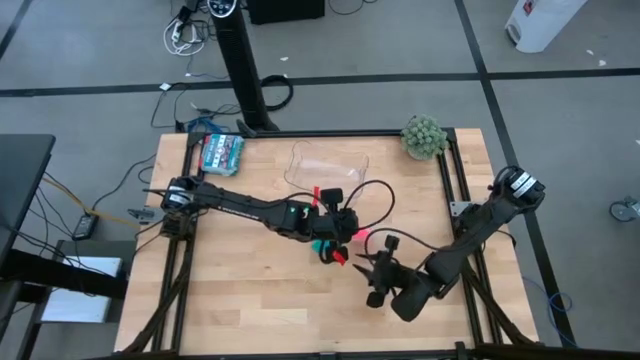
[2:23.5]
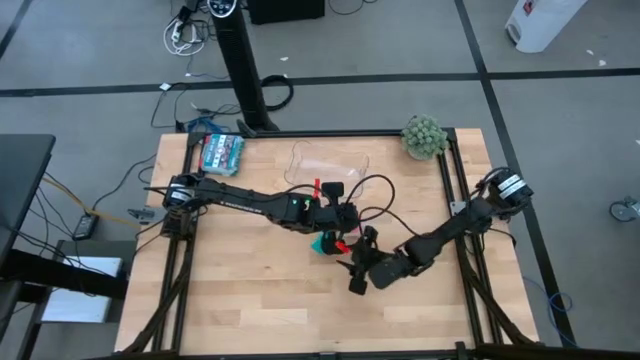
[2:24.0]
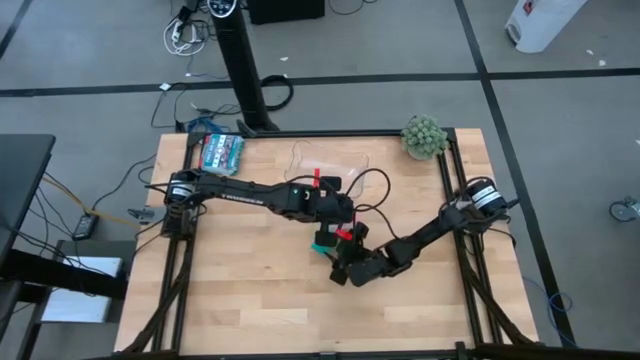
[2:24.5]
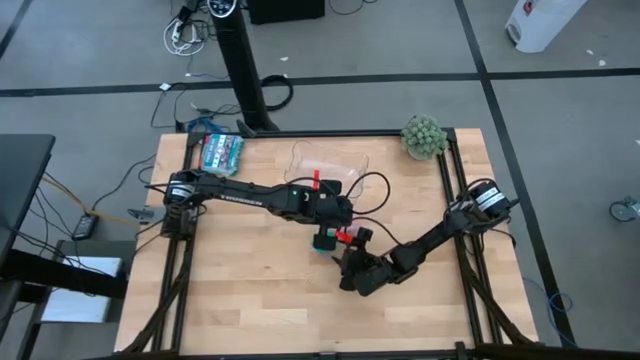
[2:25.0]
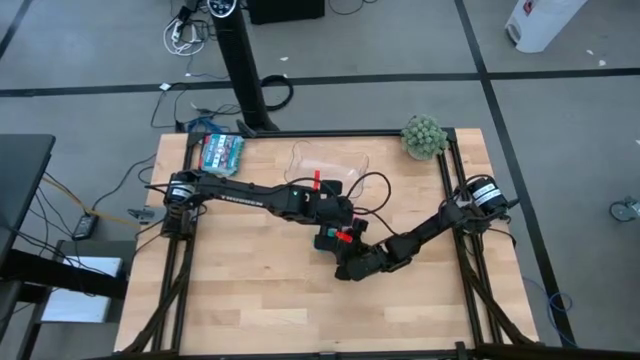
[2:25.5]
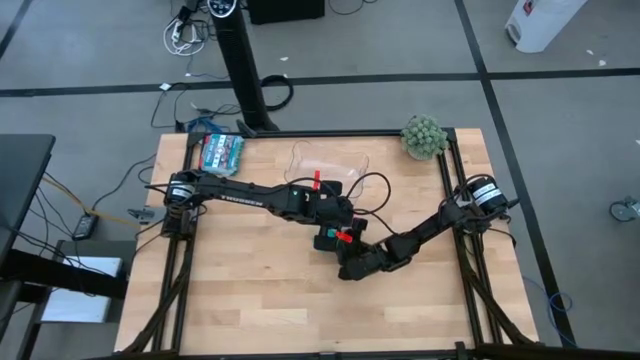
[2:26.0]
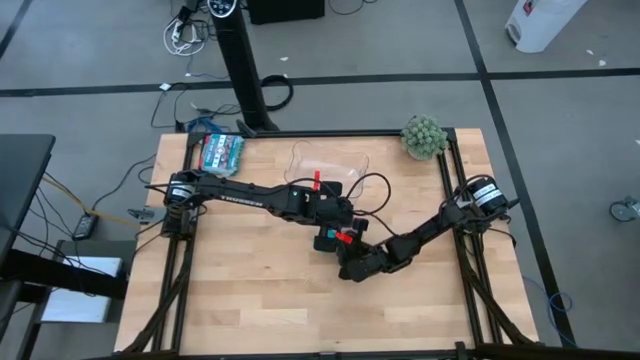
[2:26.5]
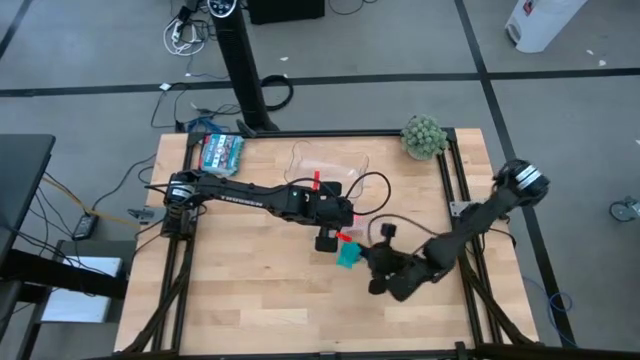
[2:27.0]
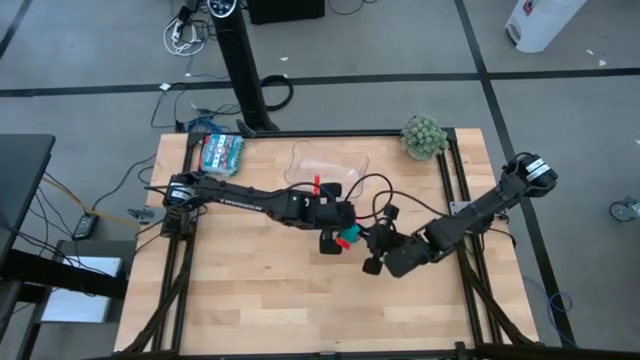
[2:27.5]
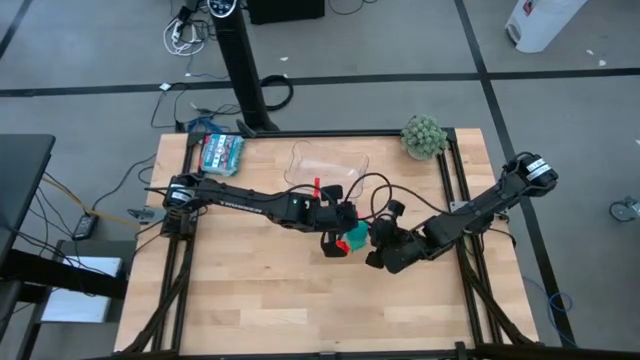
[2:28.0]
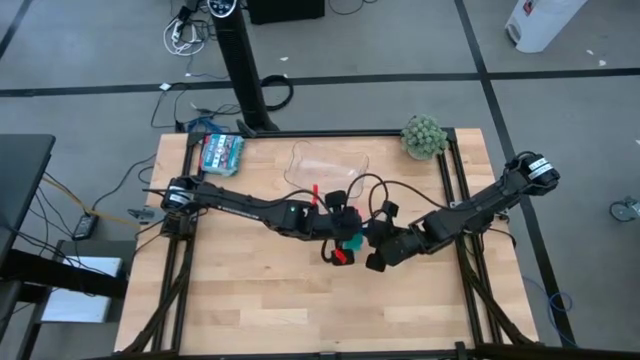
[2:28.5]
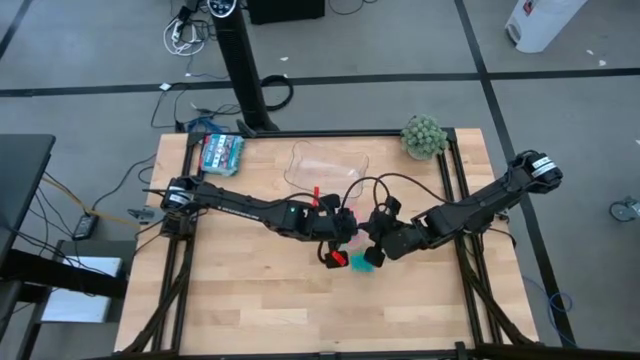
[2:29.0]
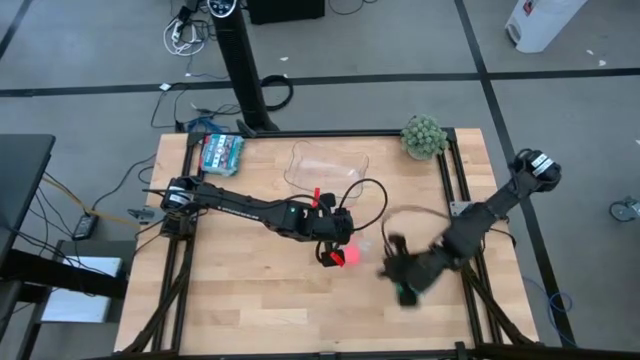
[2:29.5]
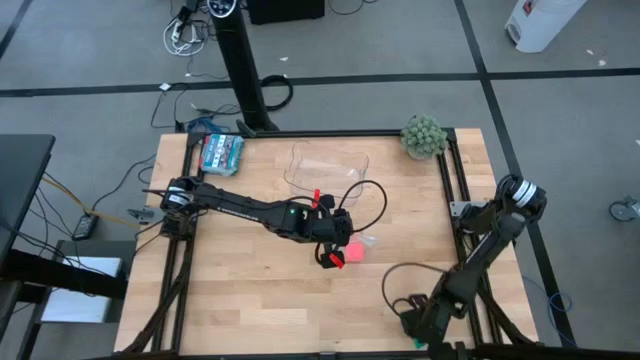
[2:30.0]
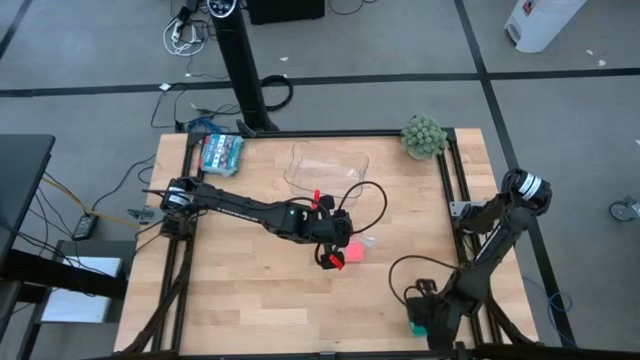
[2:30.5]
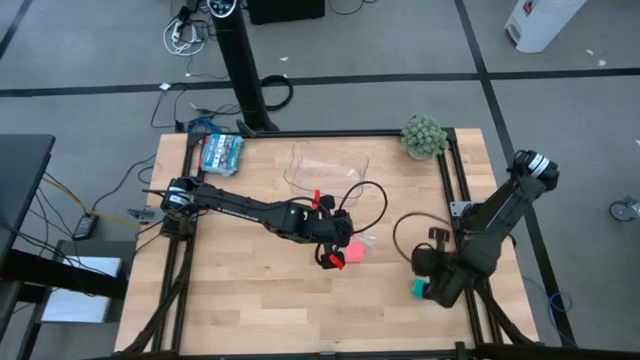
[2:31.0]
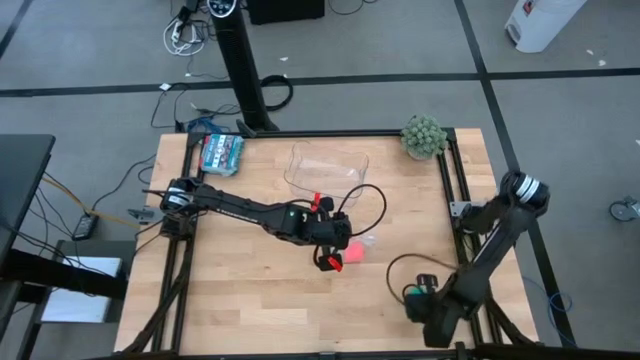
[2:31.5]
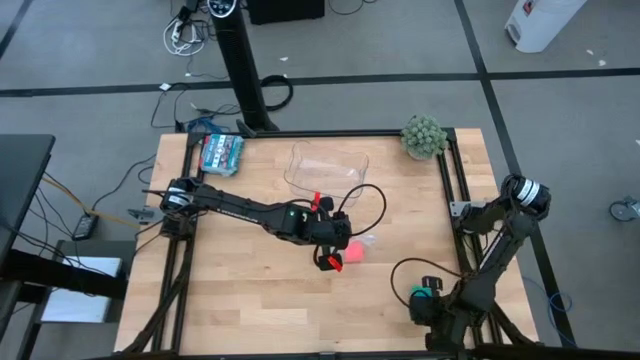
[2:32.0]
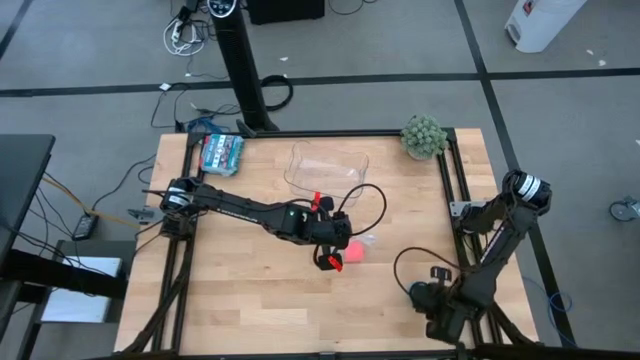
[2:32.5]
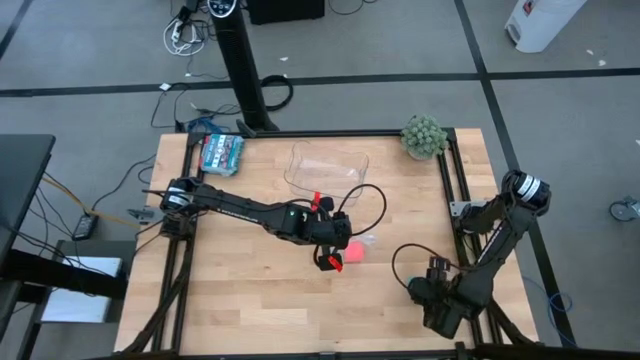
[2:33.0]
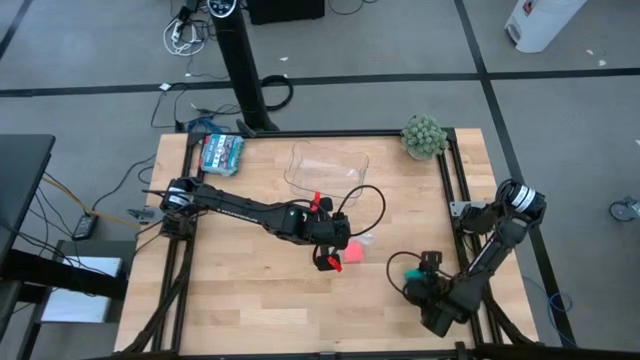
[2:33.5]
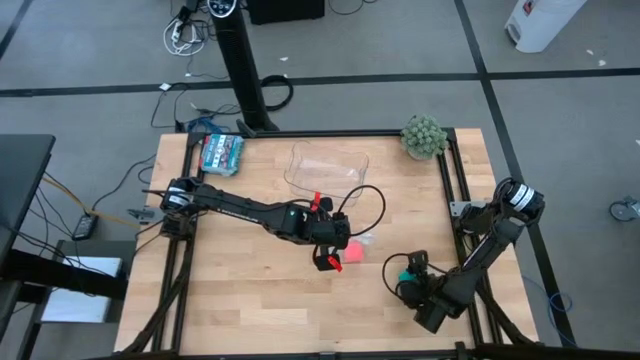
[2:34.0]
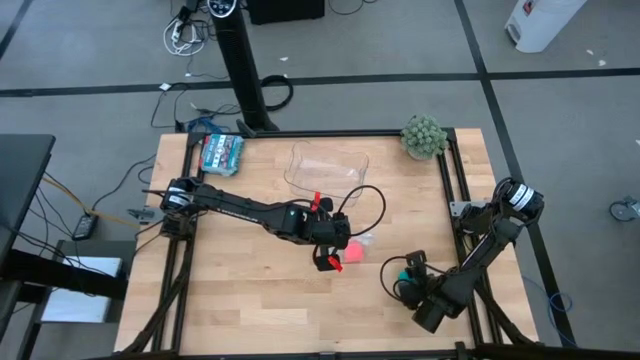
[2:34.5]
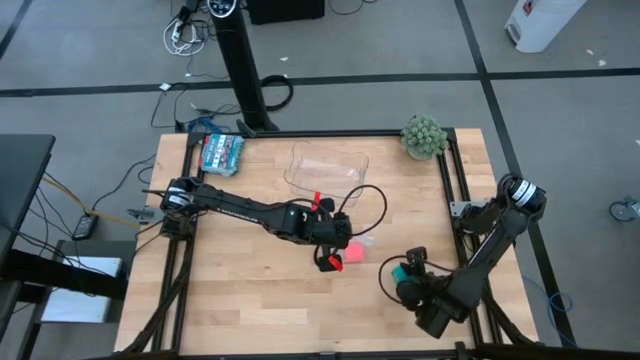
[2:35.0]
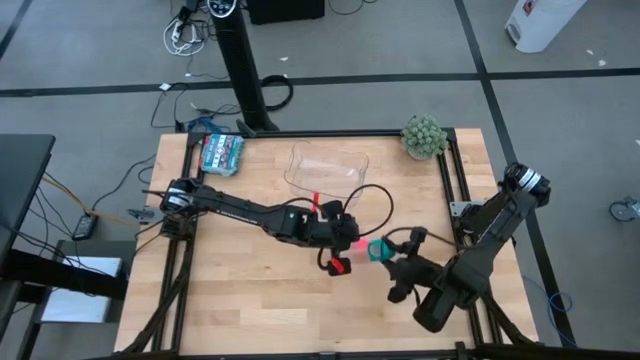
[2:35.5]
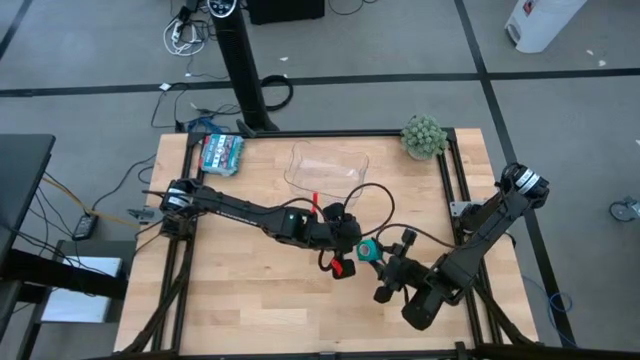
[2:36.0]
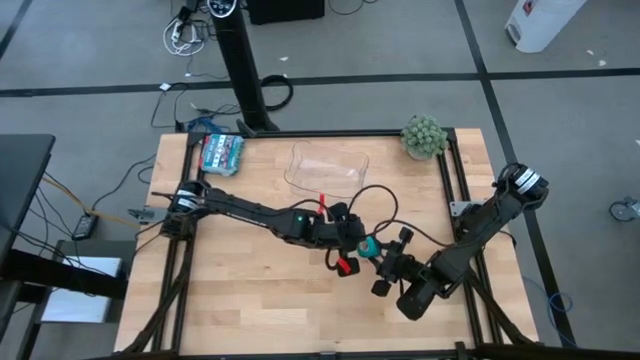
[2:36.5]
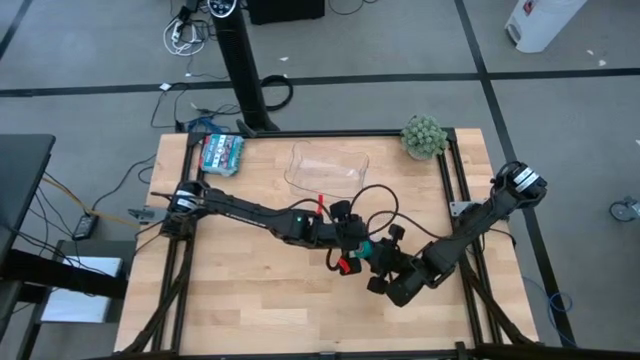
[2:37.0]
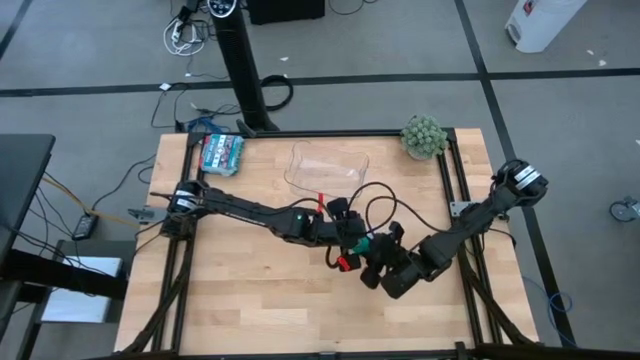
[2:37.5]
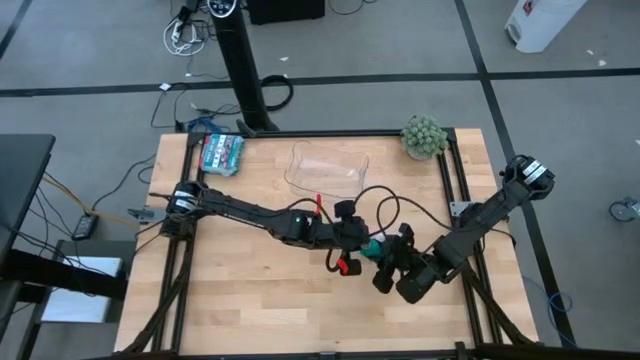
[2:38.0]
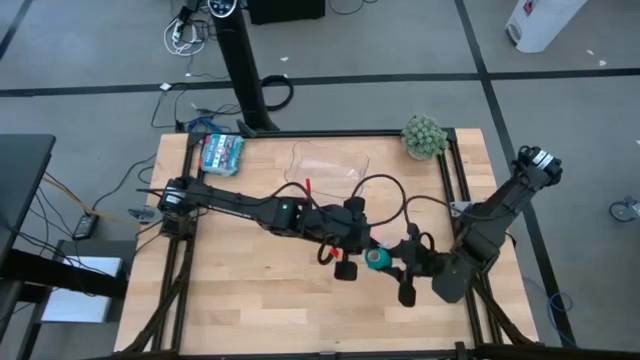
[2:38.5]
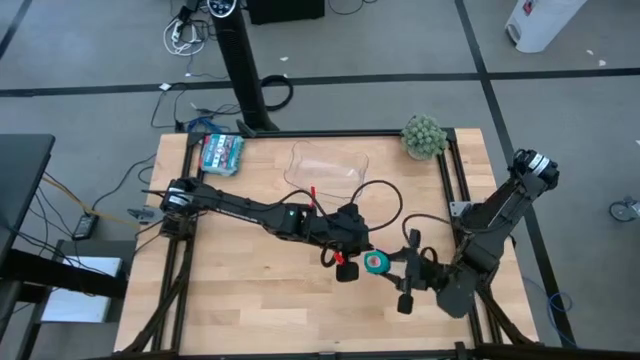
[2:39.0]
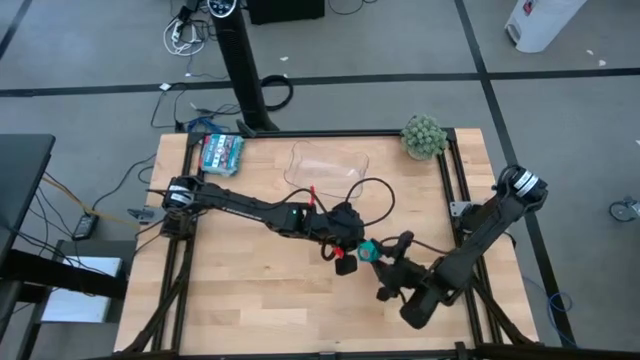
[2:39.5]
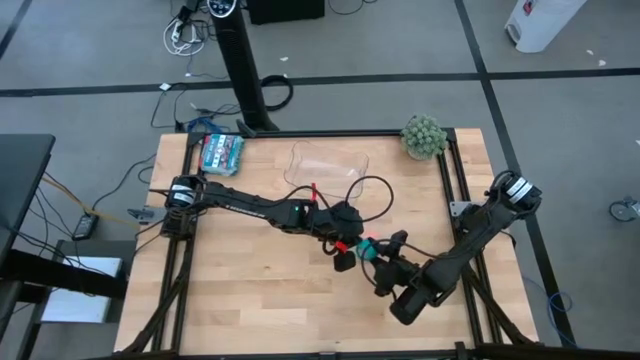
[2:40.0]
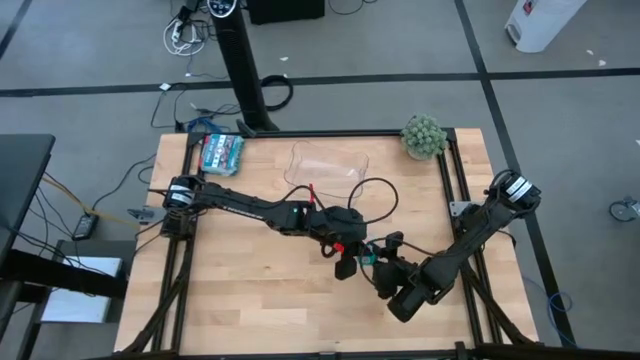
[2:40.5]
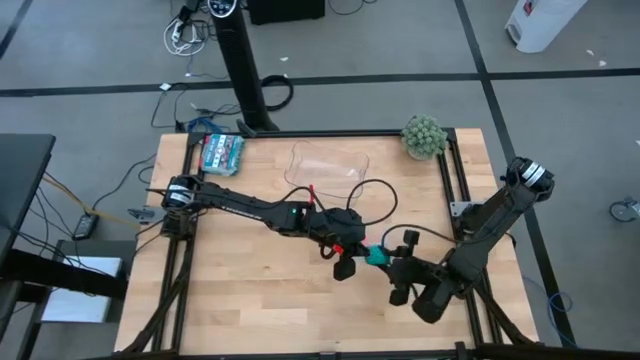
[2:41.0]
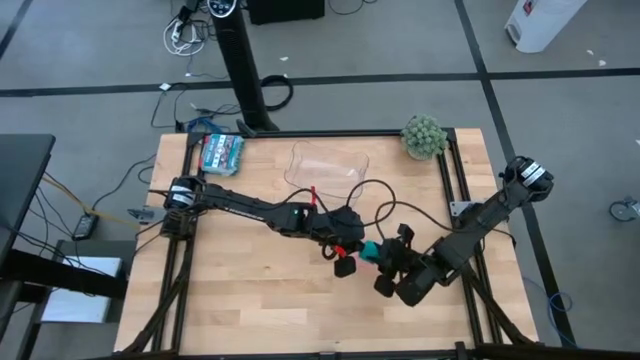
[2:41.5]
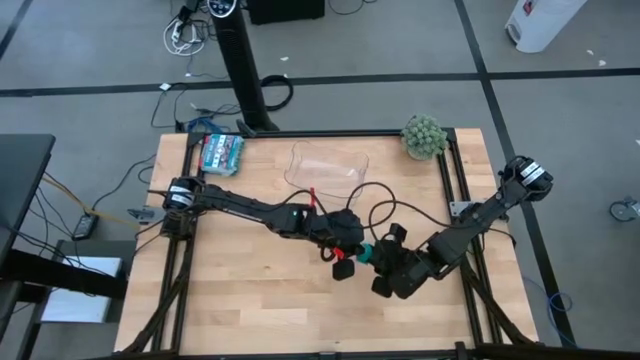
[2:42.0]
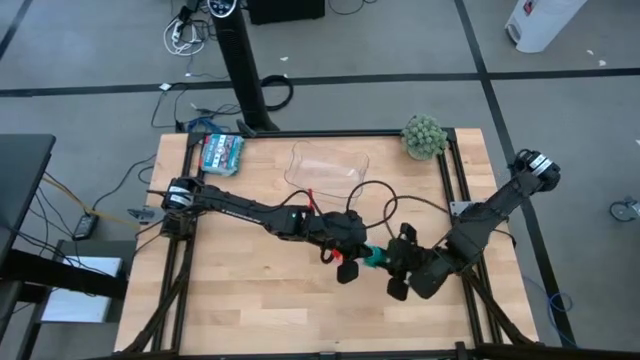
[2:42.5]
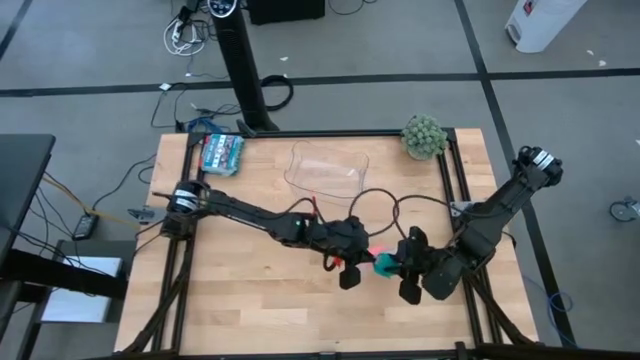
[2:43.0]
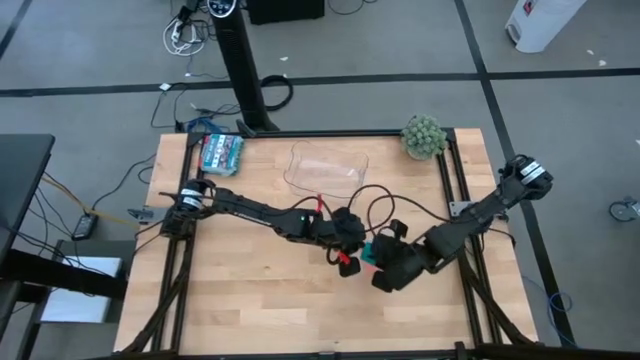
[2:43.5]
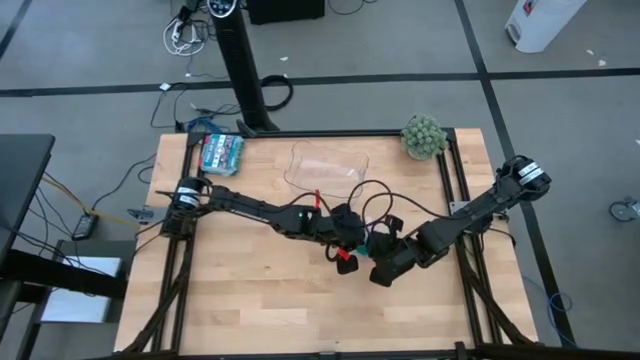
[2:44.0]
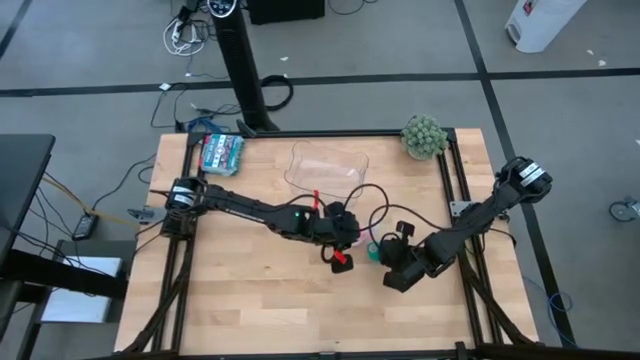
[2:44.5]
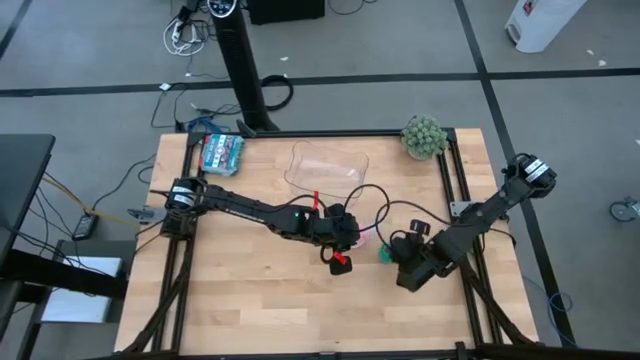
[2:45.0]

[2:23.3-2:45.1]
Task: Roll bandage
Put the blue bandage into the transparent zip bag
